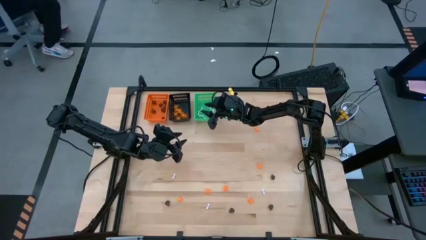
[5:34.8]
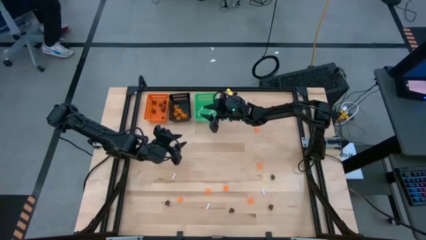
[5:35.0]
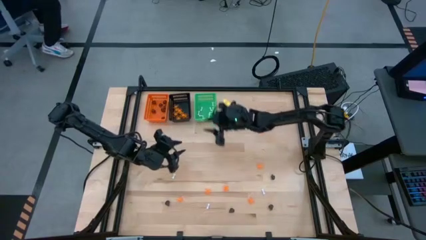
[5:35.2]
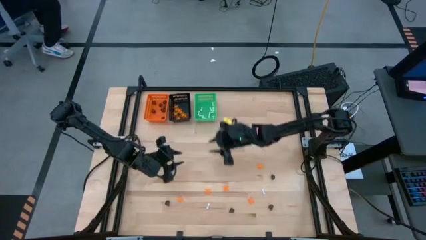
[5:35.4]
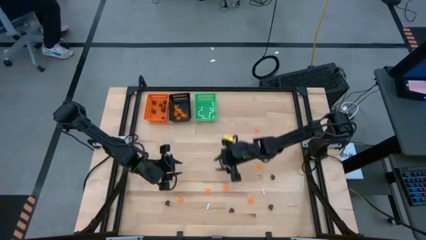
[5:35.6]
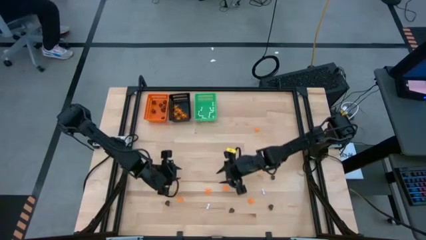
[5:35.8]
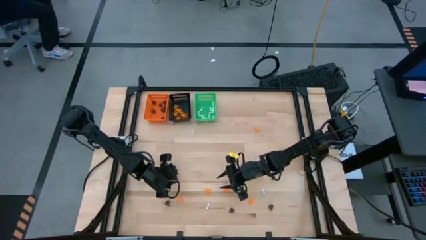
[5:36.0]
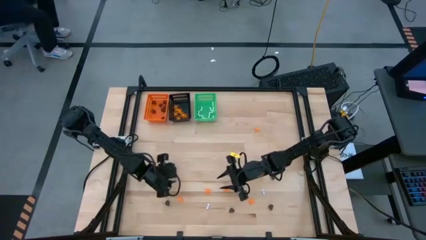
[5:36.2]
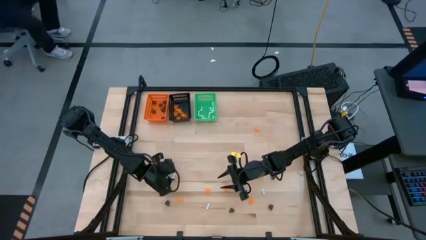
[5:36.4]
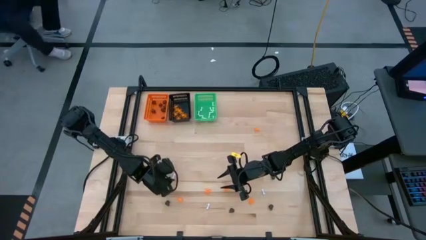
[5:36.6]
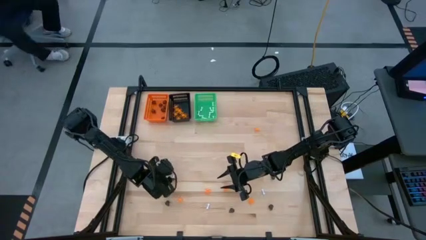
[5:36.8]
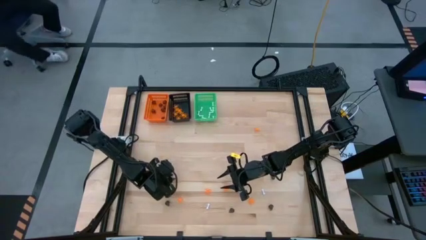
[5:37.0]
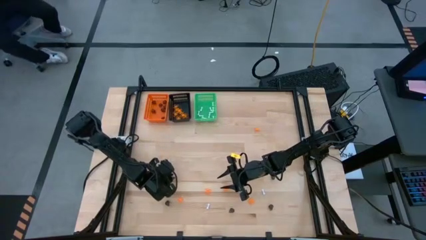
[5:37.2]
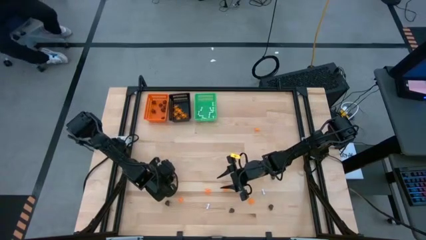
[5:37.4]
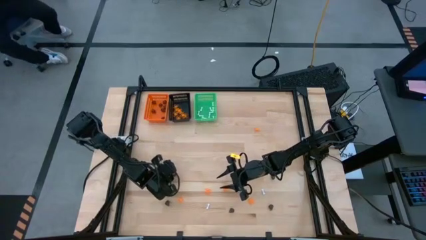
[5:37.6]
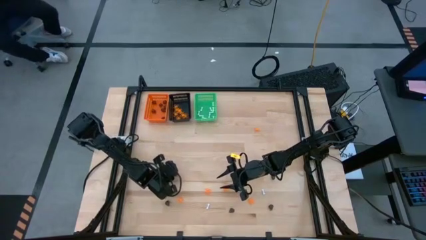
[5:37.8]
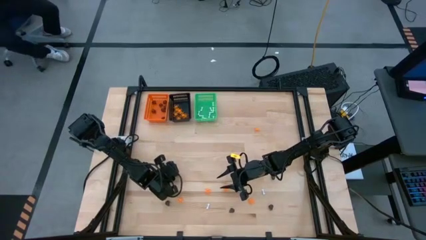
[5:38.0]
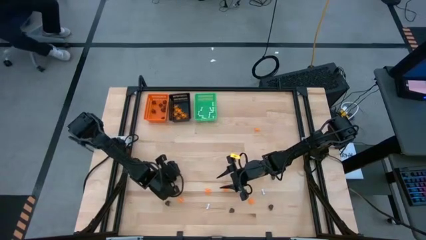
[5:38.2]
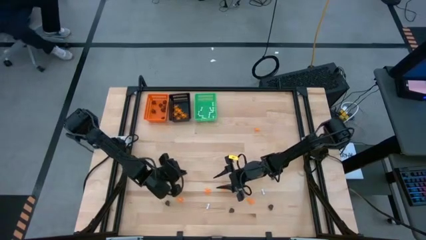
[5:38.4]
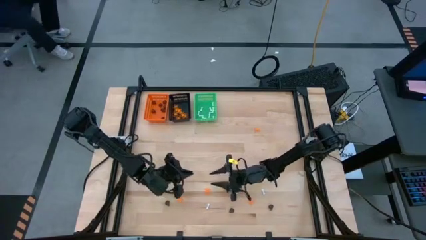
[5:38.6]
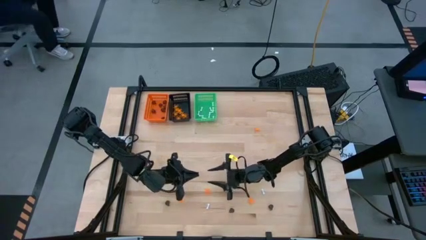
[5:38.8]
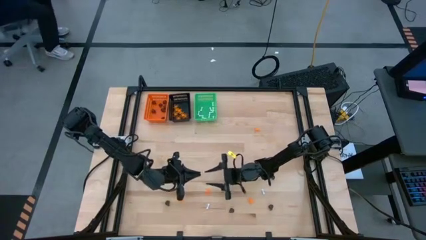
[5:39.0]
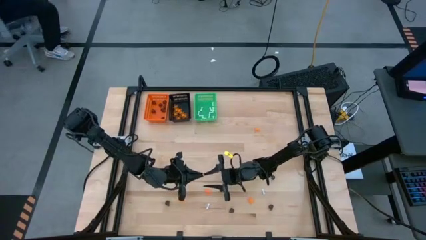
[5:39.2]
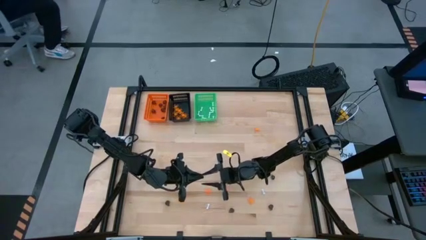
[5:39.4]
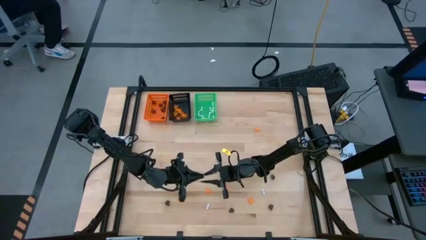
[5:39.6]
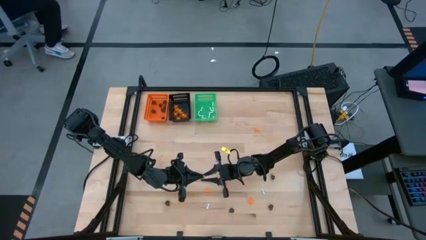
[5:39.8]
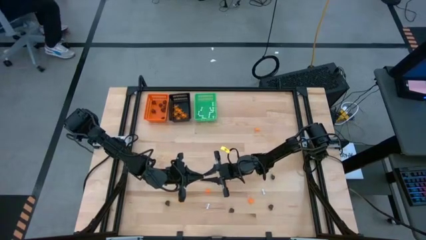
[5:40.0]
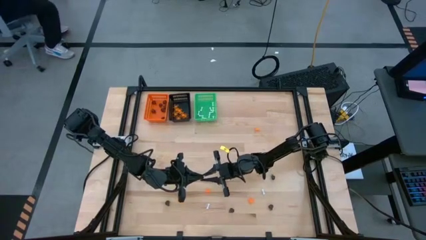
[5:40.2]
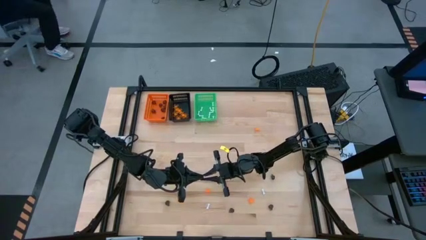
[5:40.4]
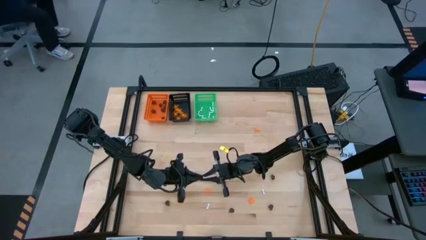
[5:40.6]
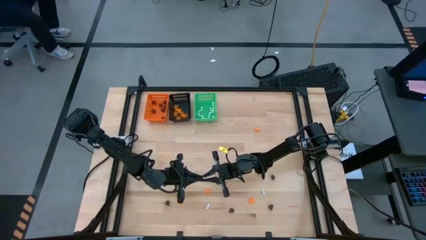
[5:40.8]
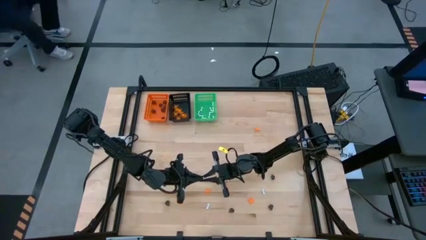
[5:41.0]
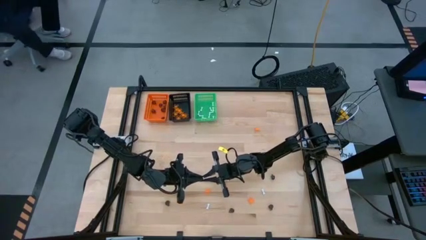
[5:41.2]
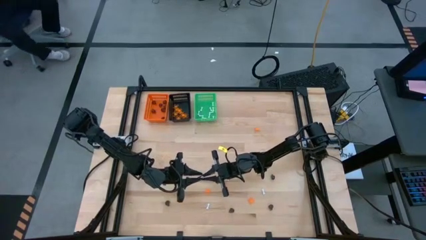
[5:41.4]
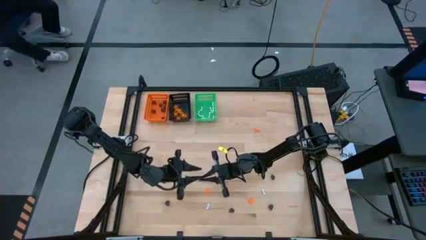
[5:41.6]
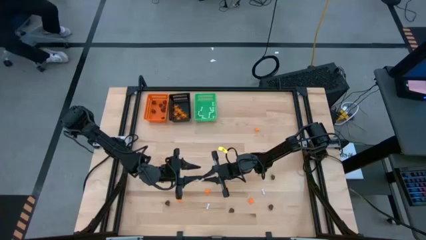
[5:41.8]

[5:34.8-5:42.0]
Task: Sort Halloween decoration
Put the white bone toy into the green bin

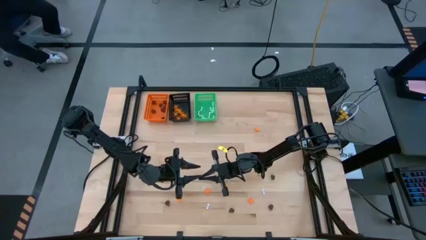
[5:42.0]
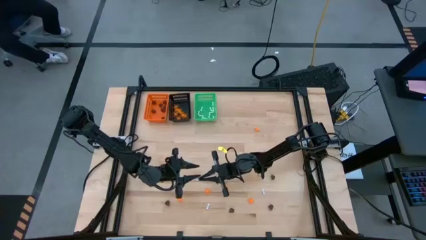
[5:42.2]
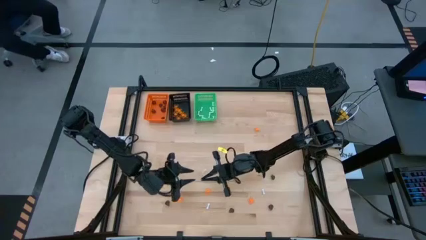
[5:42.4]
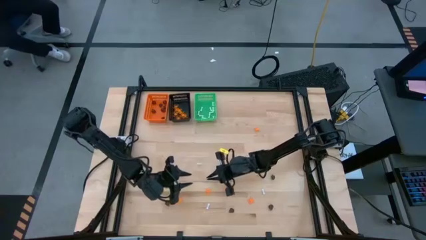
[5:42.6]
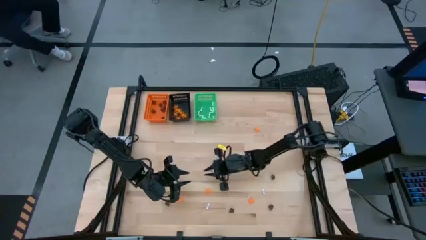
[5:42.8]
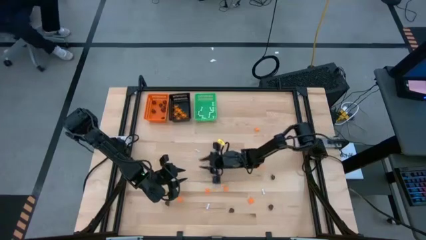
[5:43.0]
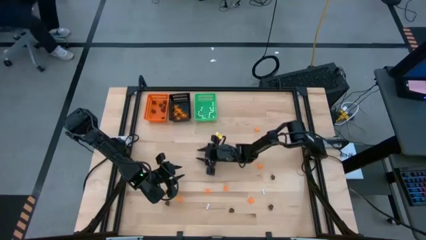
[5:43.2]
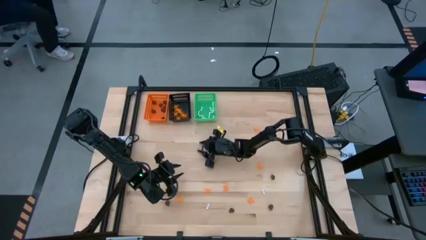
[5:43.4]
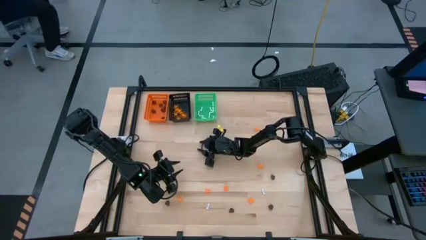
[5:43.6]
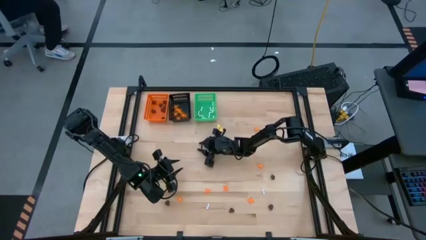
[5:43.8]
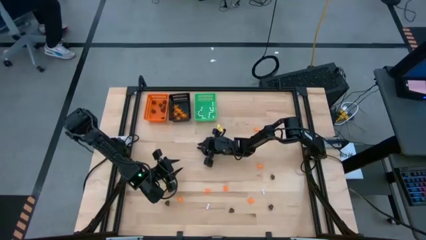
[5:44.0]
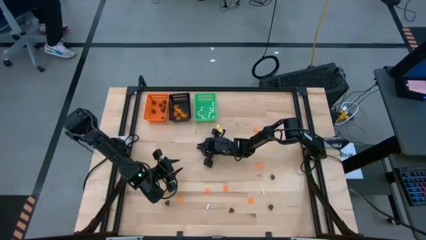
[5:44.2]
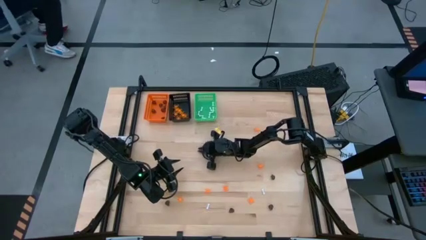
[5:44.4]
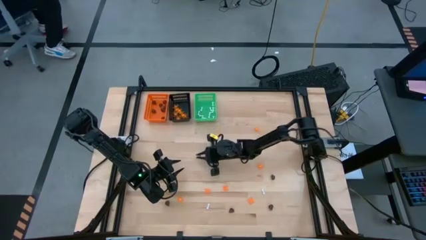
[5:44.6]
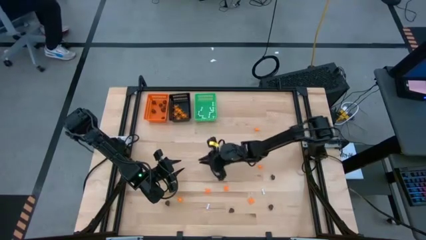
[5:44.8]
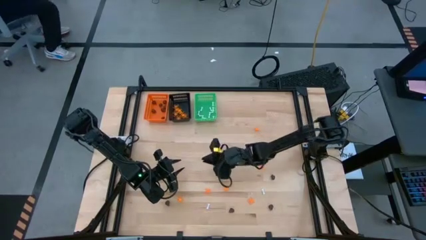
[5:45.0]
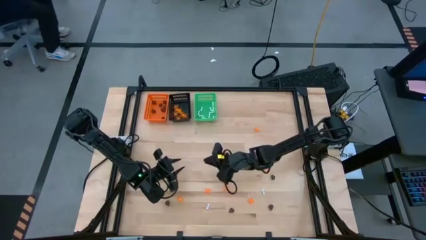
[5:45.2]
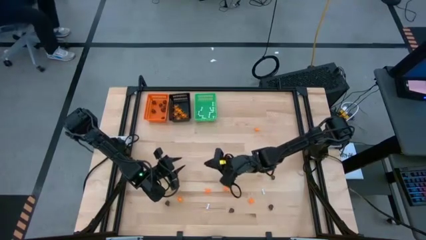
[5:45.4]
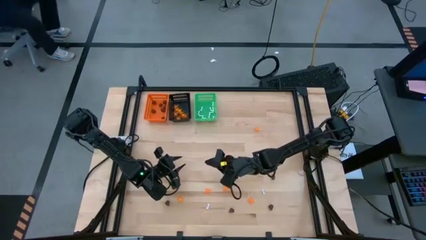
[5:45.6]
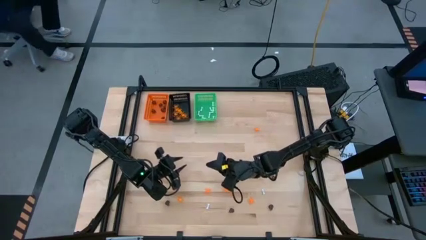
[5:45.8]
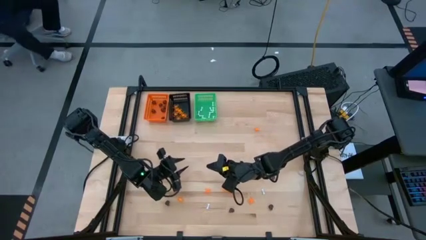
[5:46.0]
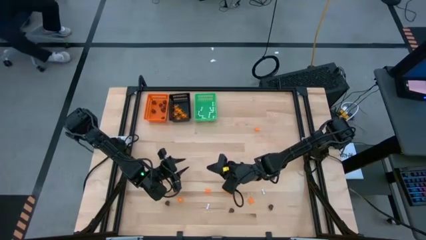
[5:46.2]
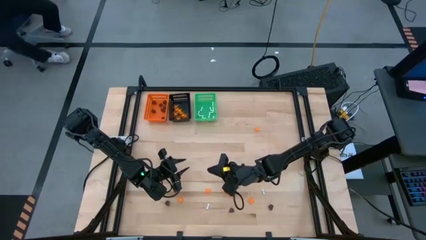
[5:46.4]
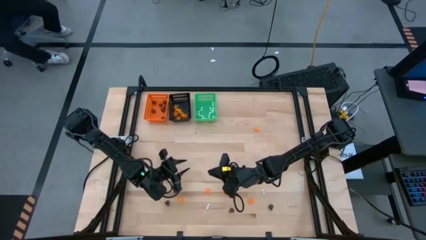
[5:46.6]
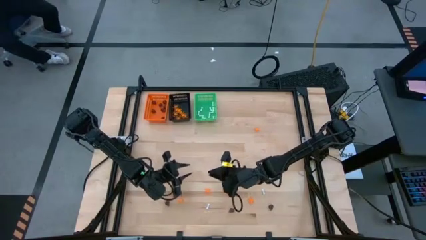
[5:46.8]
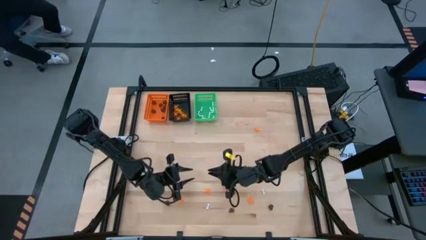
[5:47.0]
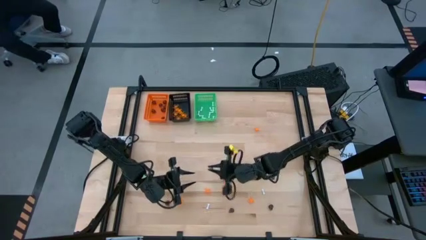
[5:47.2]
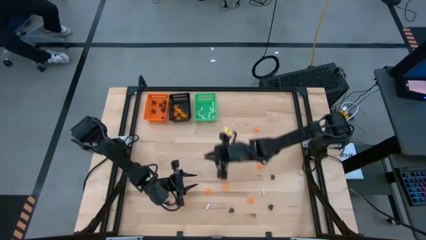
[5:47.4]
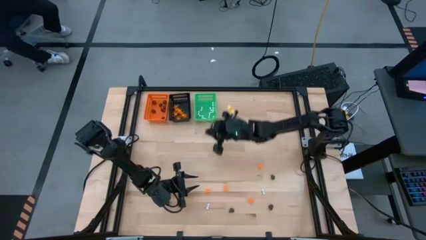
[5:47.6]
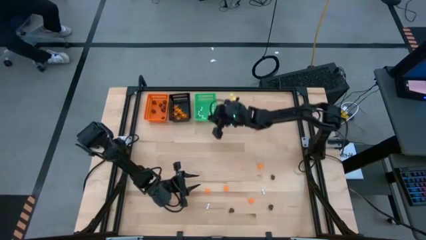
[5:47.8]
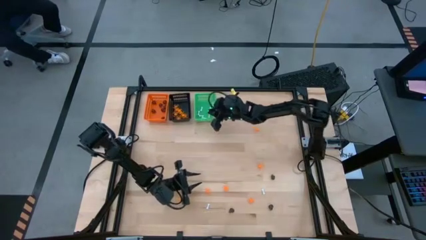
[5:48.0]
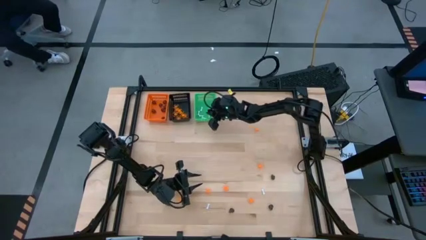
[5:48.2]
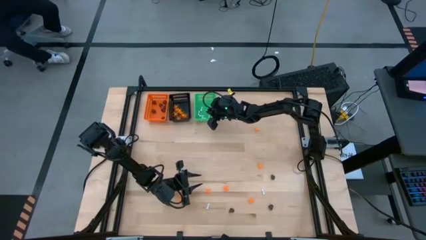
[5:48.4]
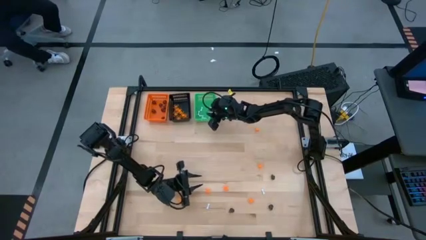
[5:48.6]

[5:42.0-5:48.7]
Put the white bone toy into the green bin
